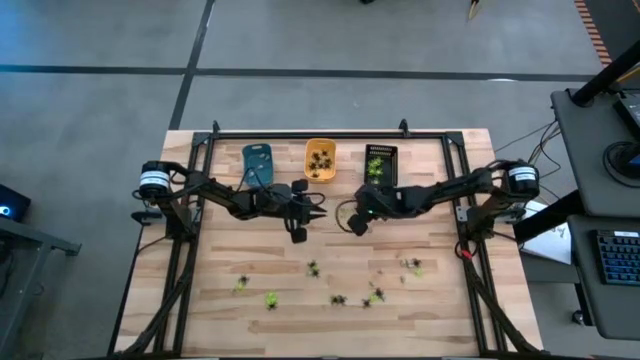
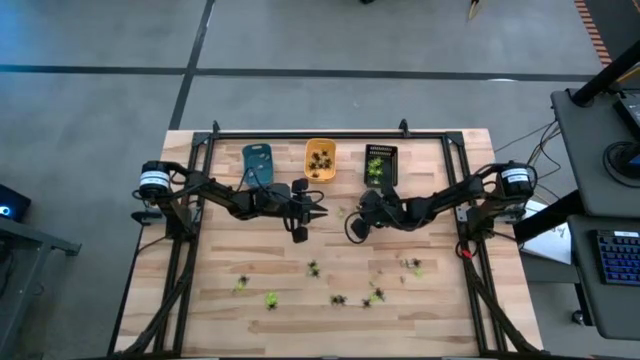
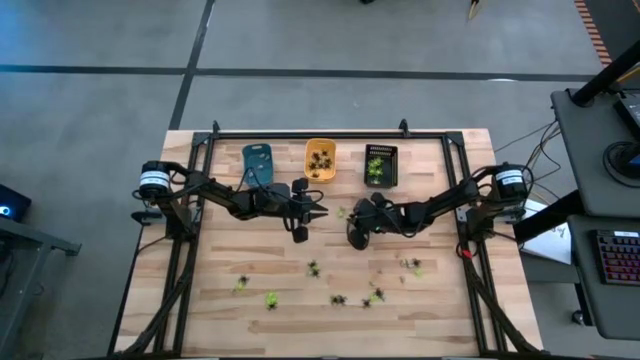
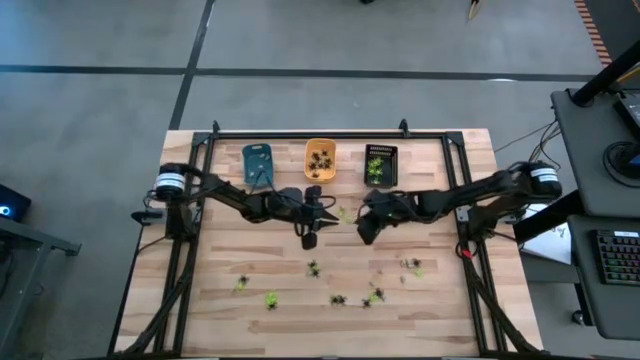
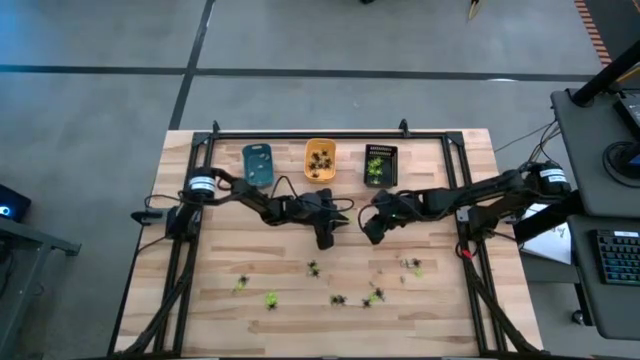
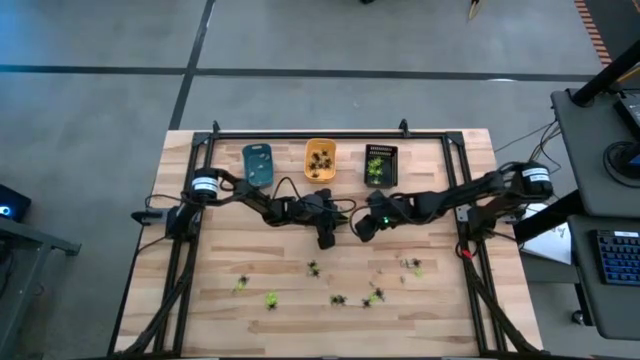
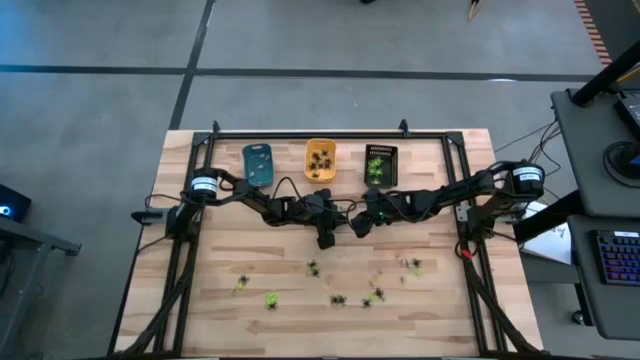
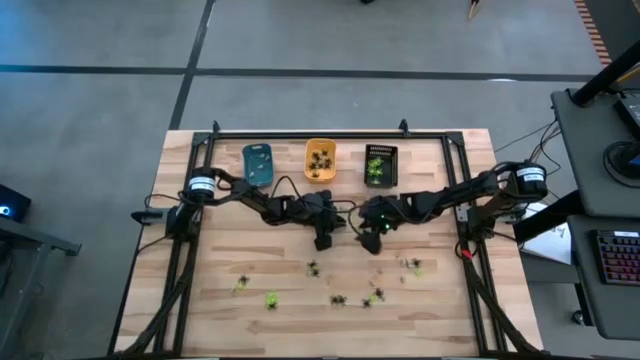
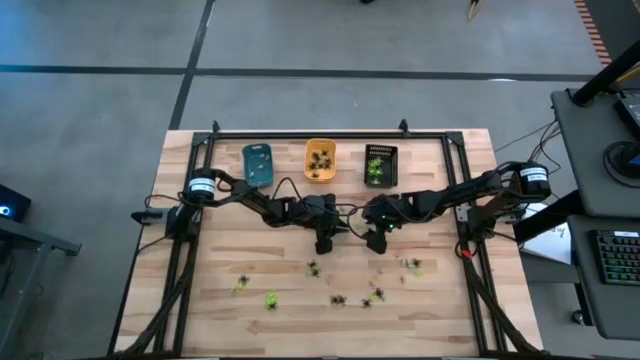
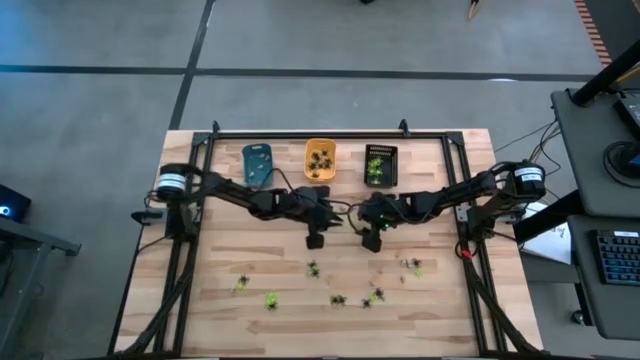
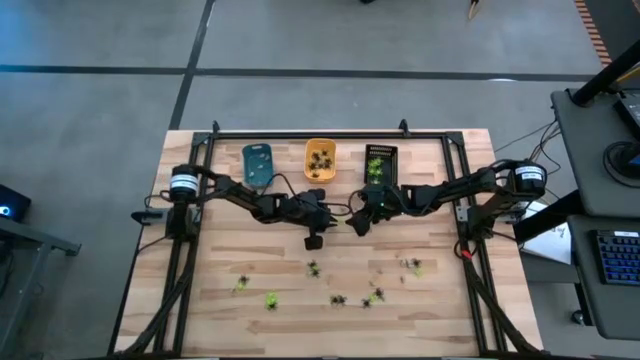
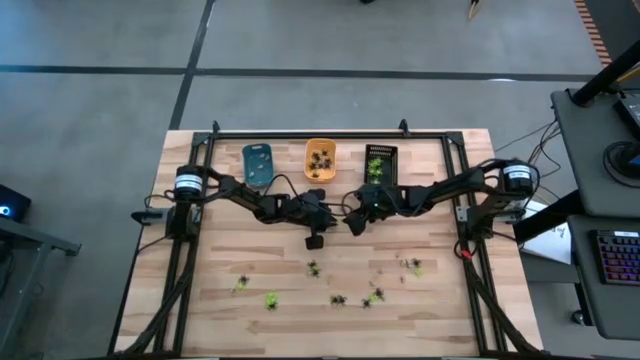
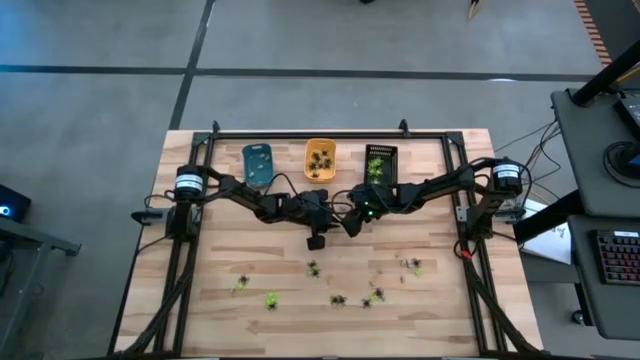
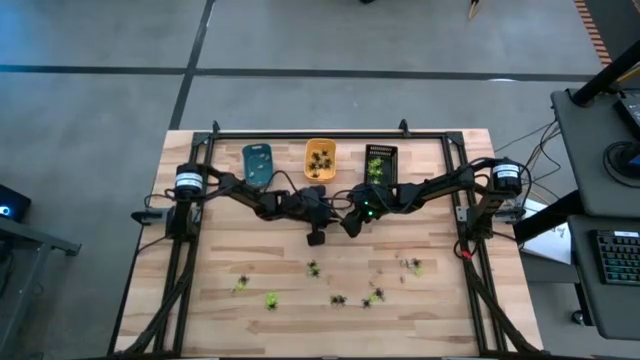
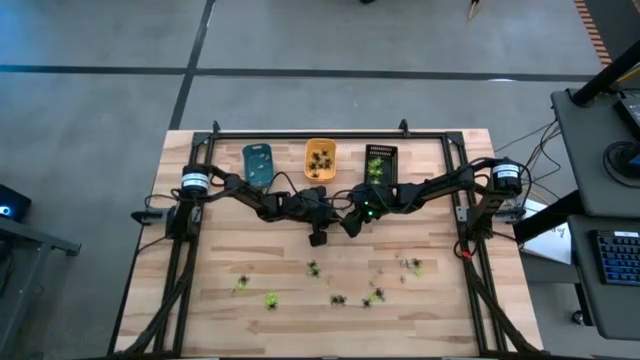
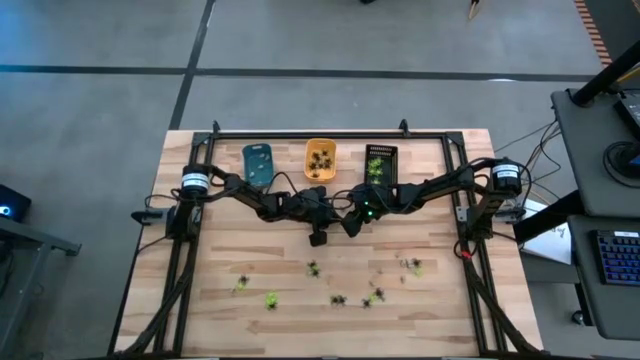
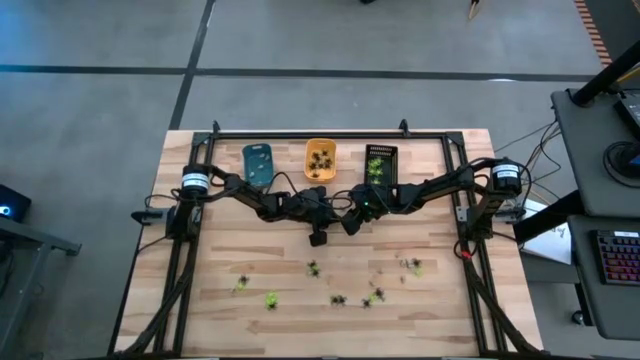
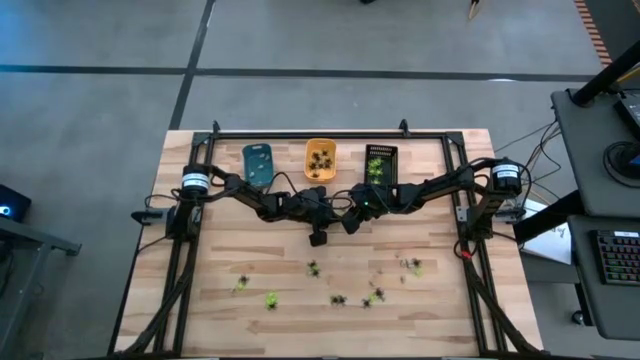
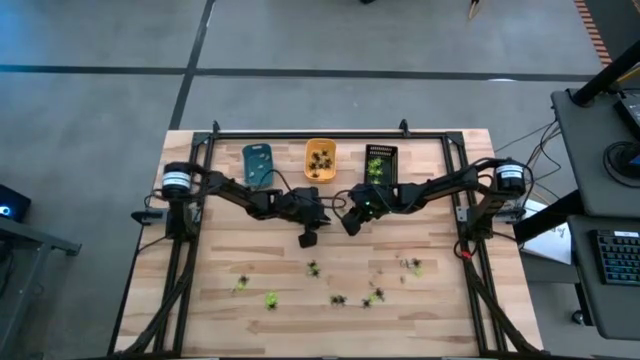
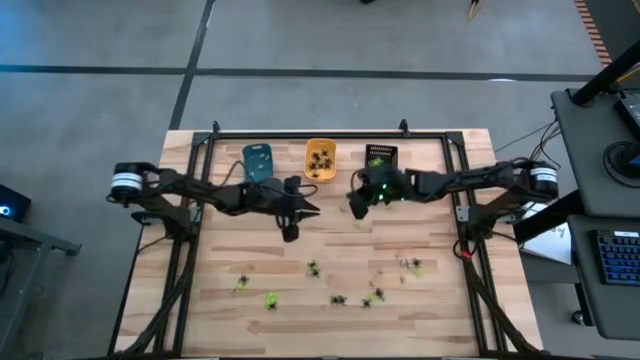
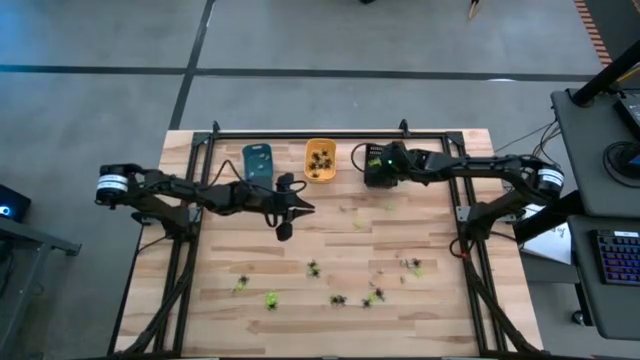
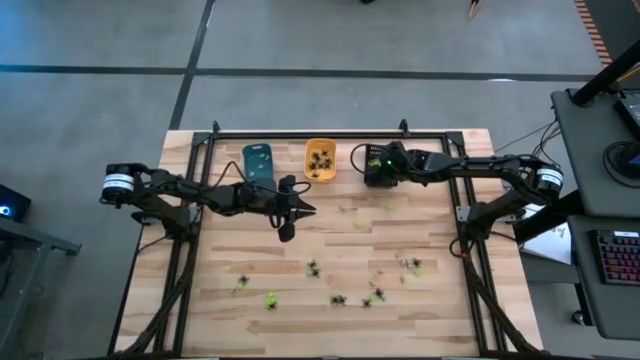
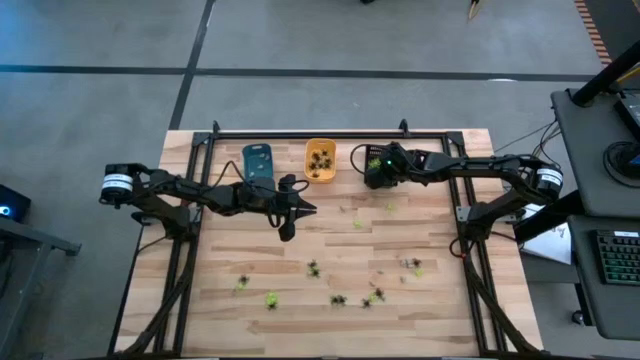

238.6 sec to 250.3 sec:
Task: Sort Halloween decoration
Put the green spider toy into the black bin

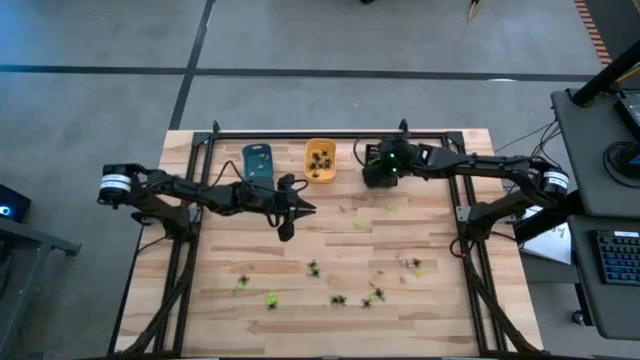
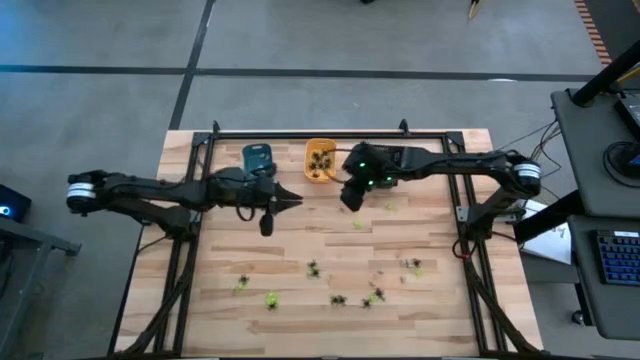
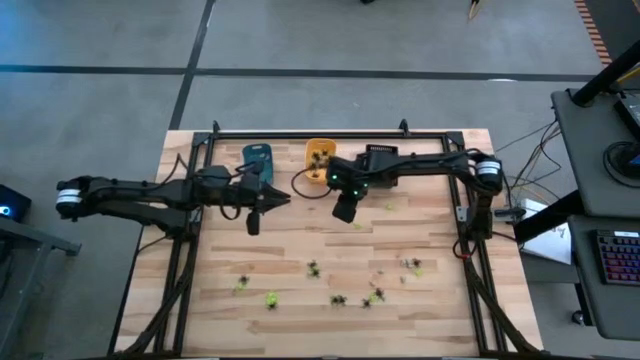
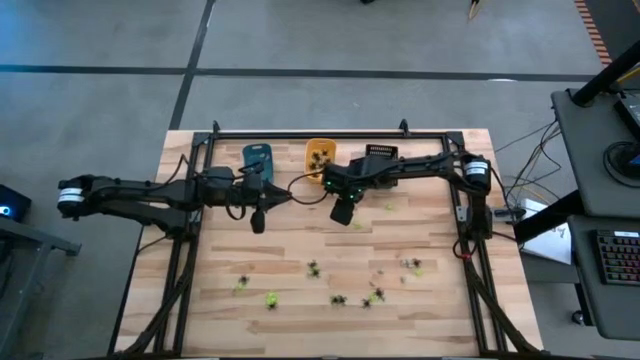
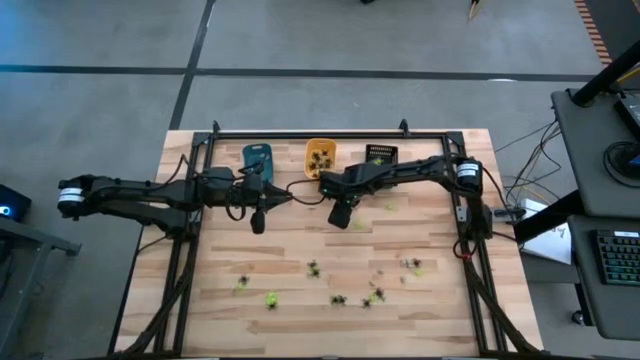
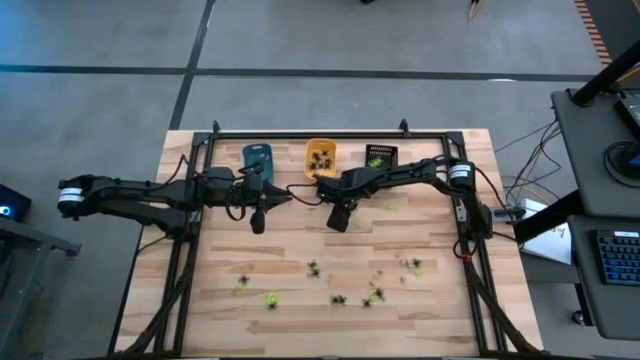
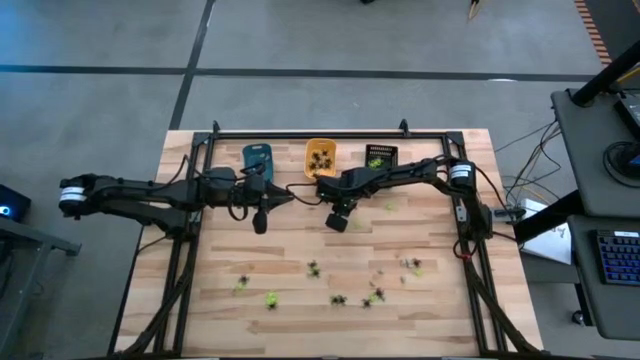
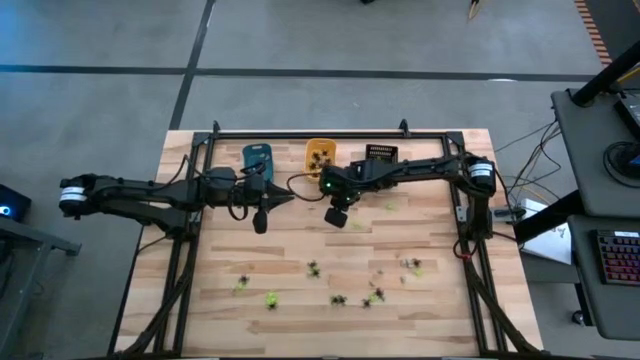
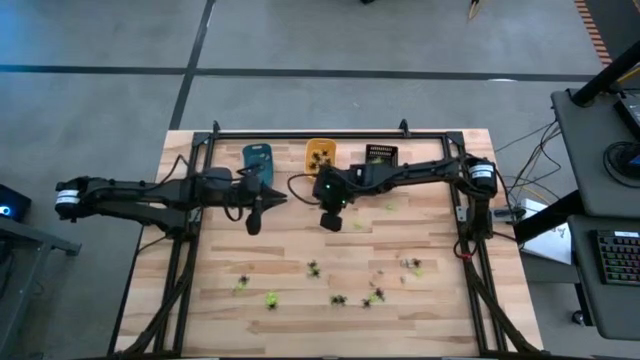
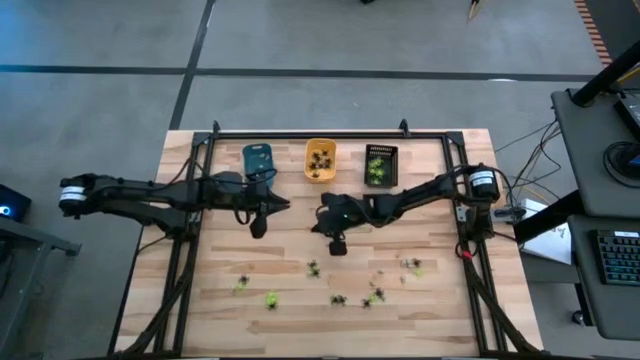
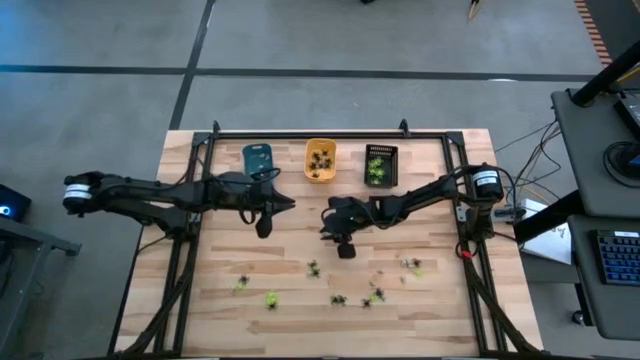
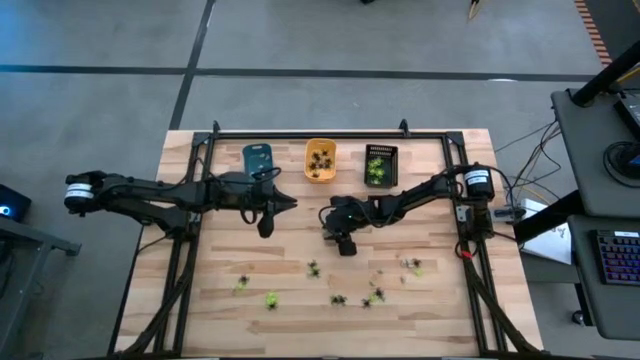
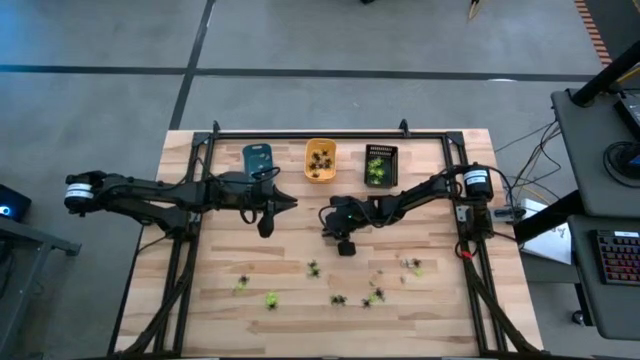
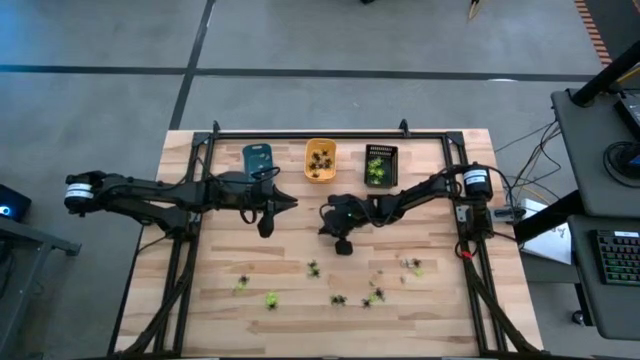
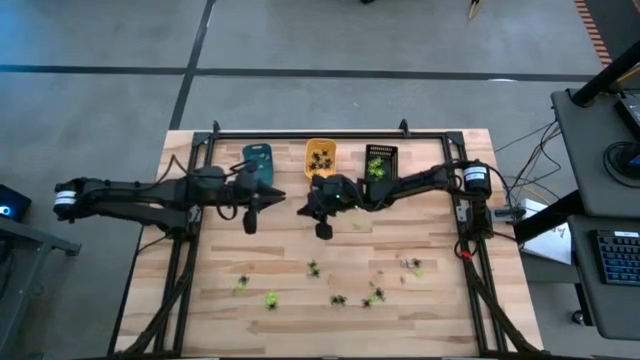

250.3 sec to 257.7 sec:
Put the white skull toy into the blue bin

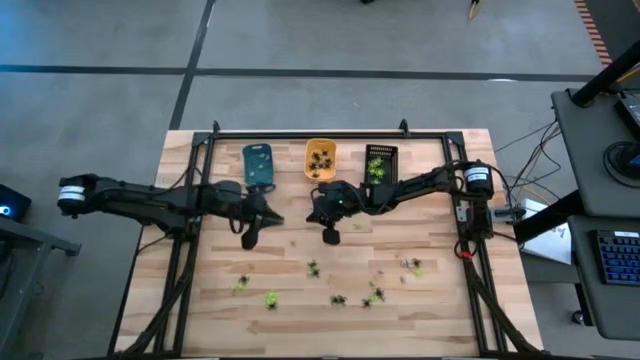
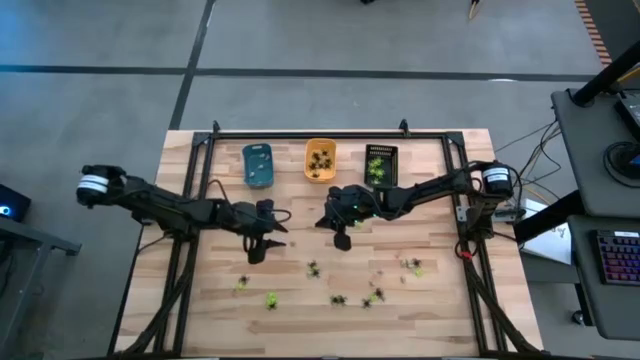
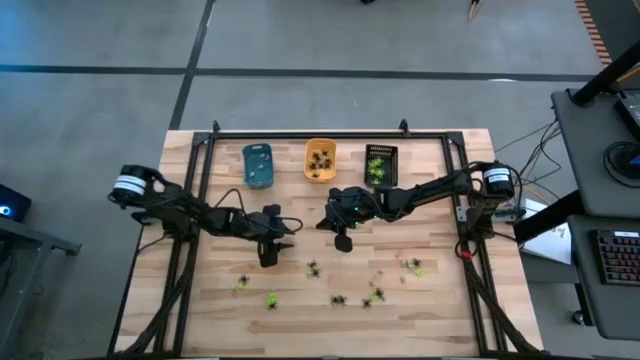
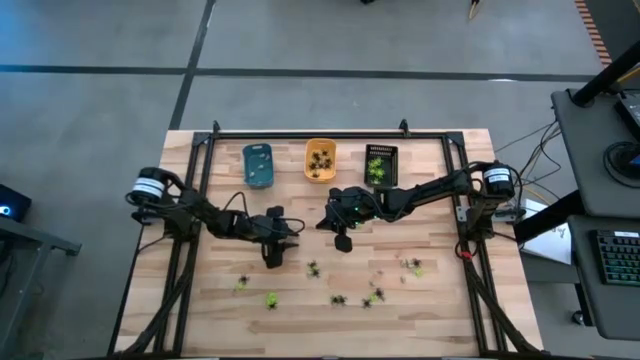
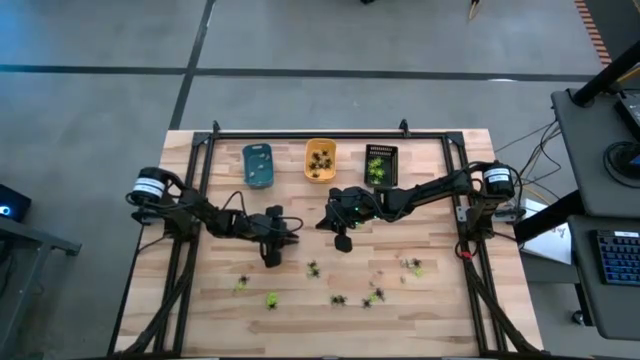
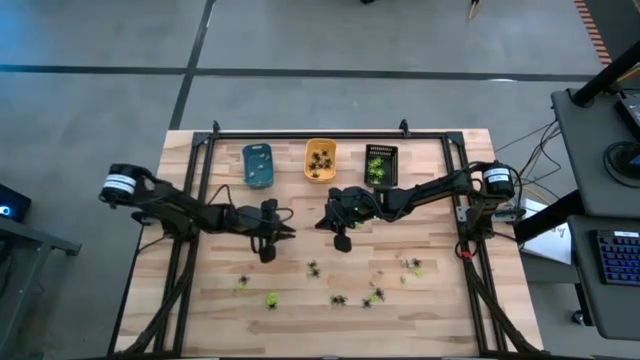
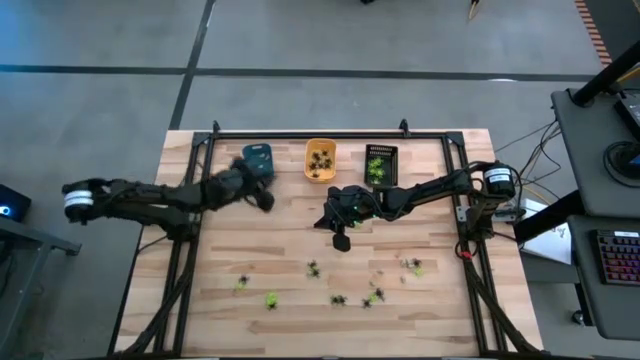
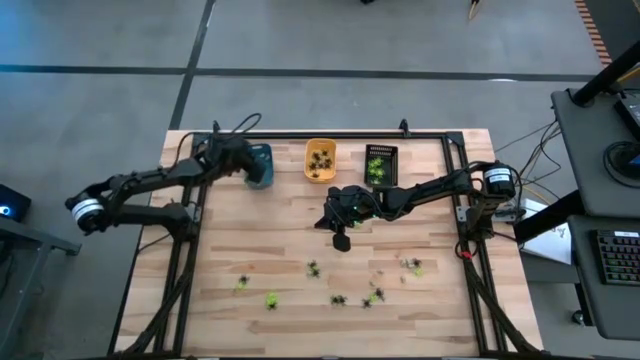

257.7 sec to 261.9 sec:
Put the white skull toy into the blue bin
